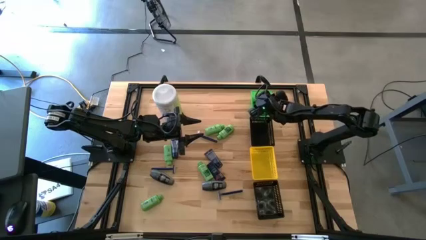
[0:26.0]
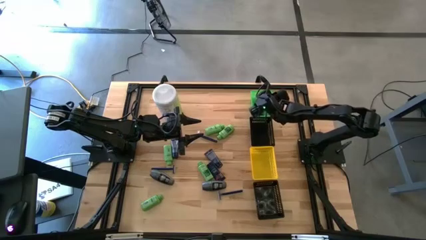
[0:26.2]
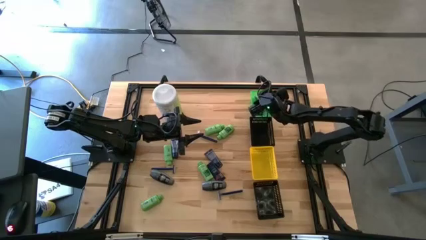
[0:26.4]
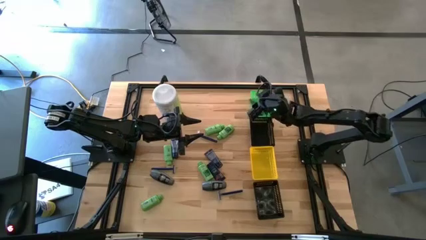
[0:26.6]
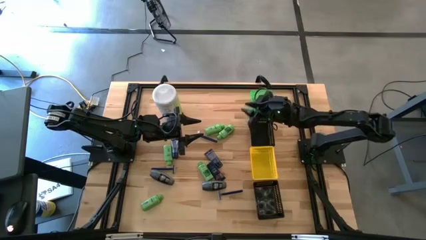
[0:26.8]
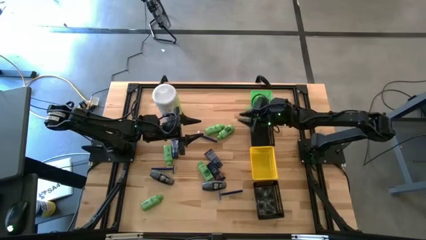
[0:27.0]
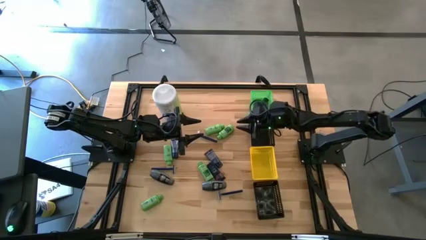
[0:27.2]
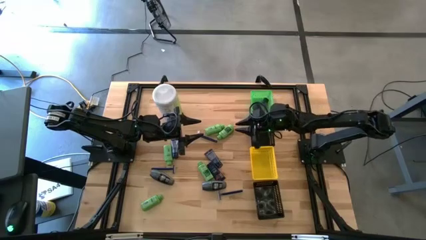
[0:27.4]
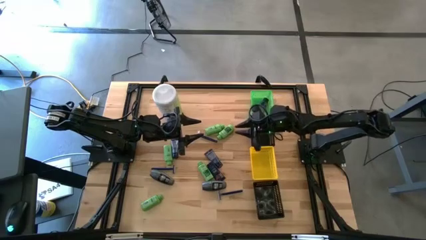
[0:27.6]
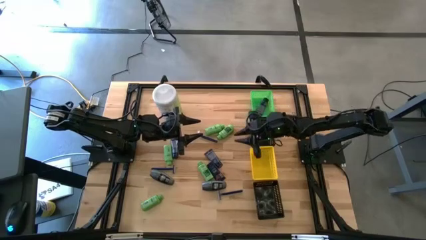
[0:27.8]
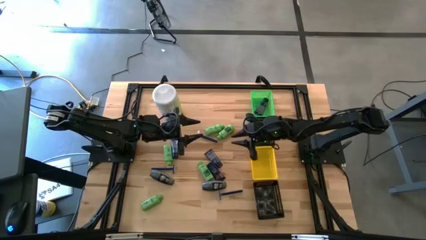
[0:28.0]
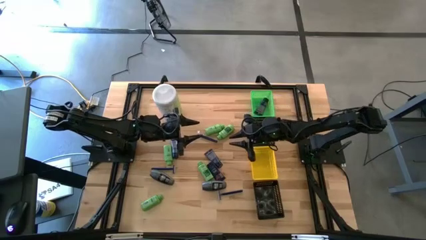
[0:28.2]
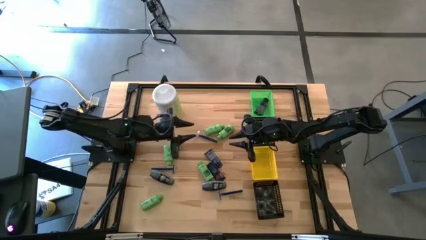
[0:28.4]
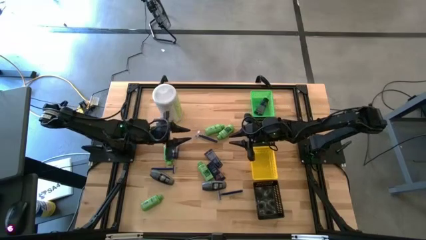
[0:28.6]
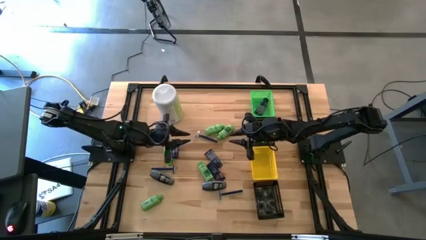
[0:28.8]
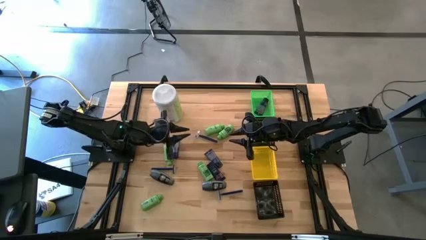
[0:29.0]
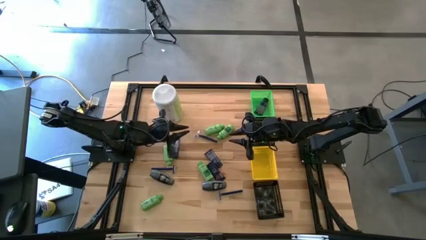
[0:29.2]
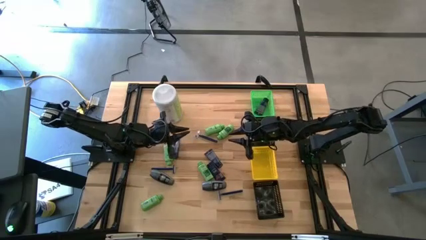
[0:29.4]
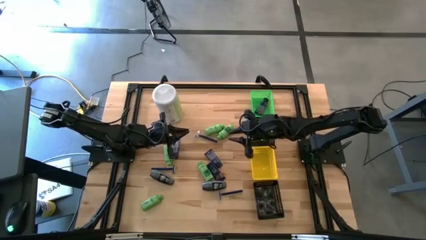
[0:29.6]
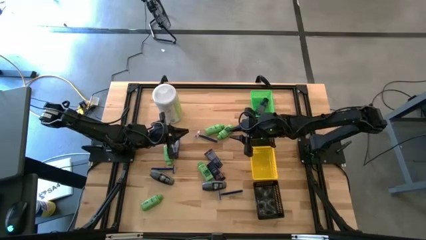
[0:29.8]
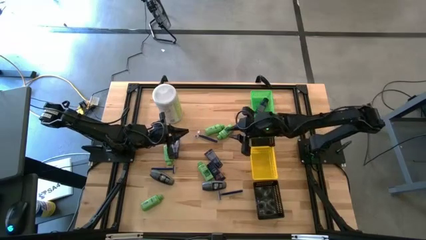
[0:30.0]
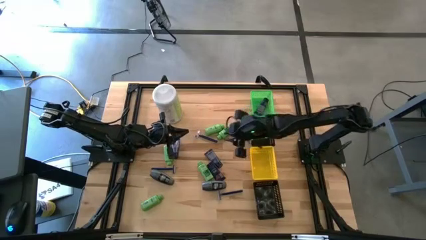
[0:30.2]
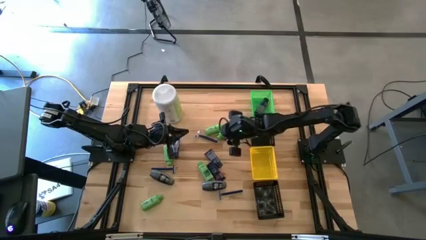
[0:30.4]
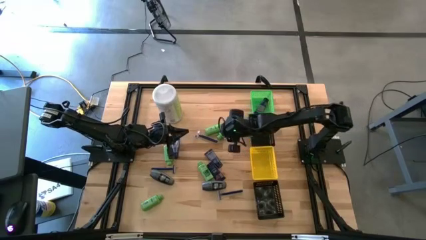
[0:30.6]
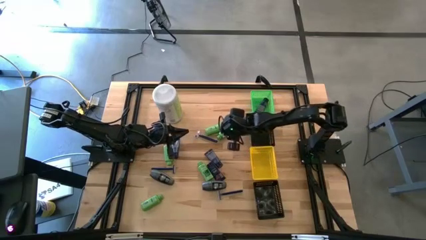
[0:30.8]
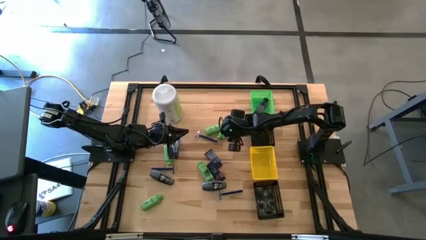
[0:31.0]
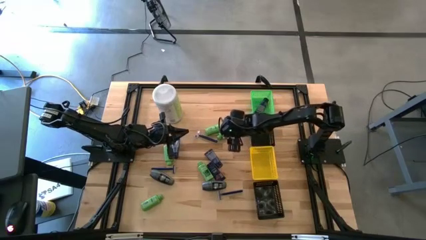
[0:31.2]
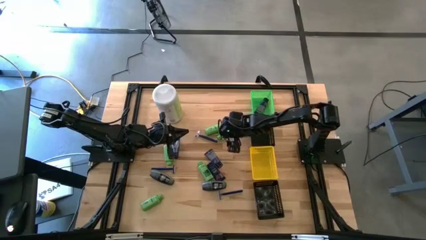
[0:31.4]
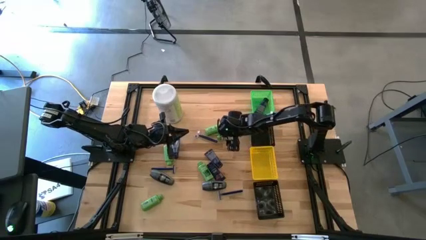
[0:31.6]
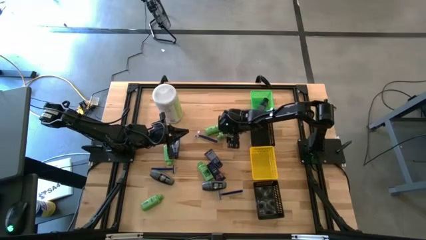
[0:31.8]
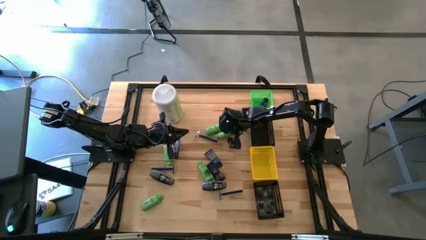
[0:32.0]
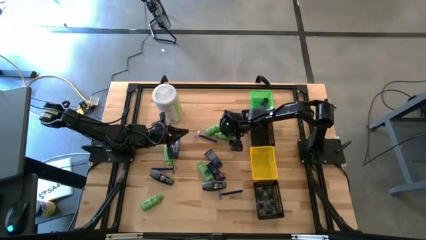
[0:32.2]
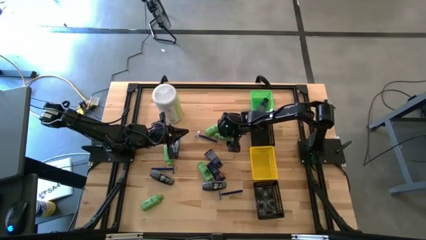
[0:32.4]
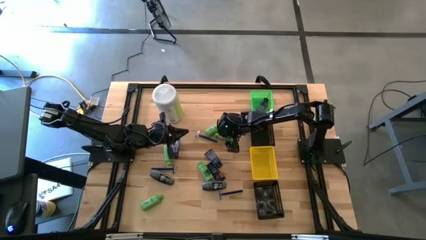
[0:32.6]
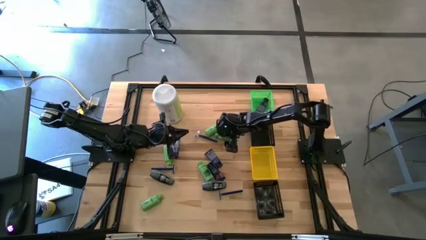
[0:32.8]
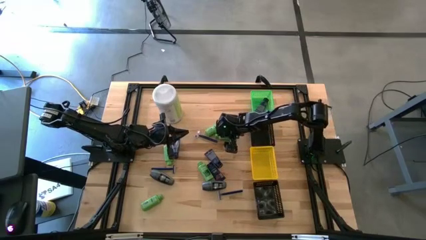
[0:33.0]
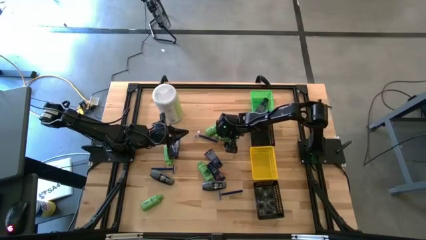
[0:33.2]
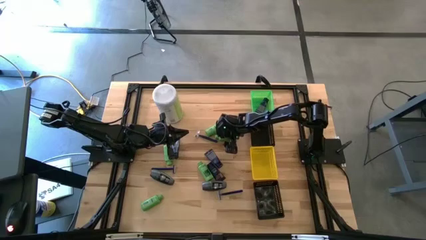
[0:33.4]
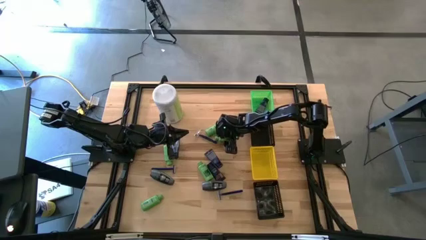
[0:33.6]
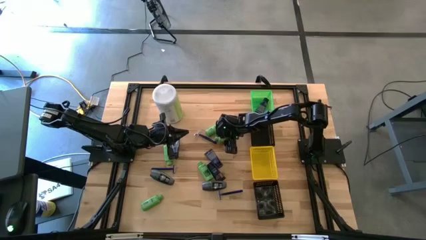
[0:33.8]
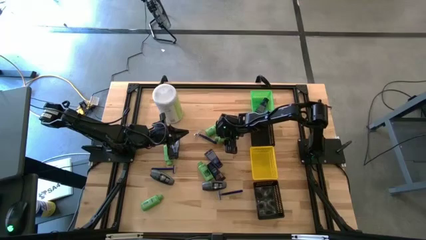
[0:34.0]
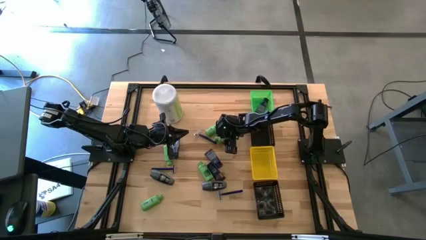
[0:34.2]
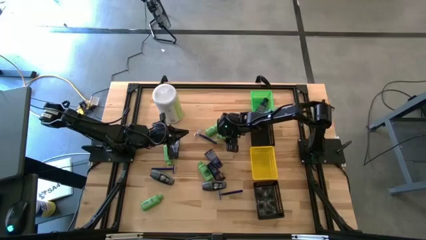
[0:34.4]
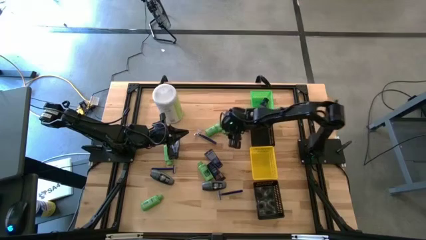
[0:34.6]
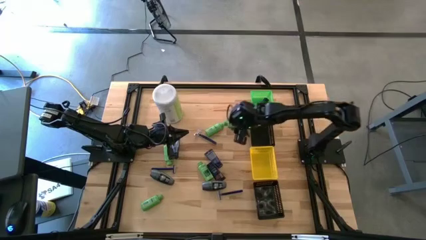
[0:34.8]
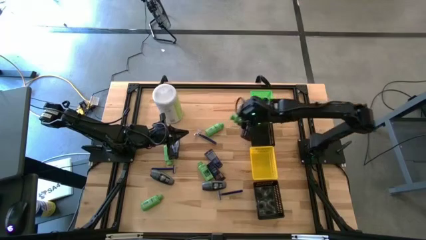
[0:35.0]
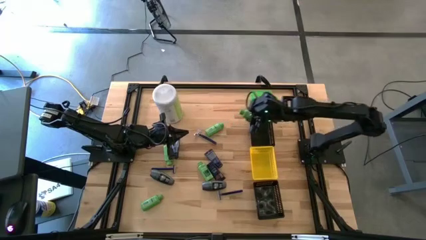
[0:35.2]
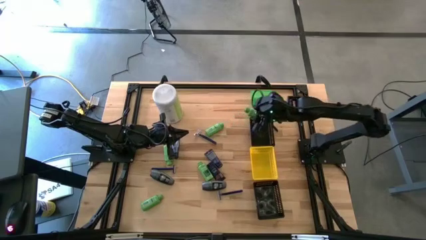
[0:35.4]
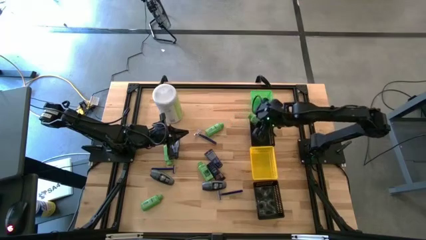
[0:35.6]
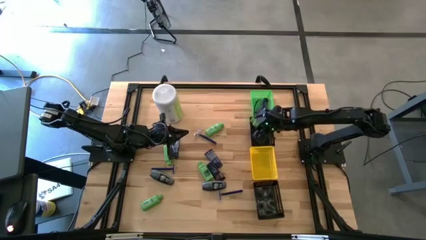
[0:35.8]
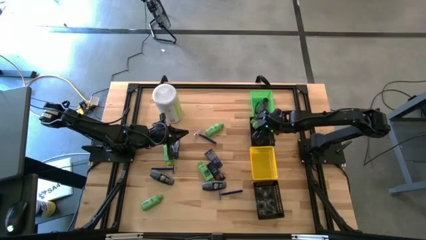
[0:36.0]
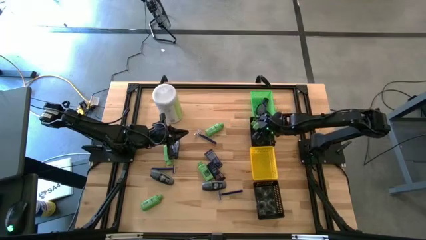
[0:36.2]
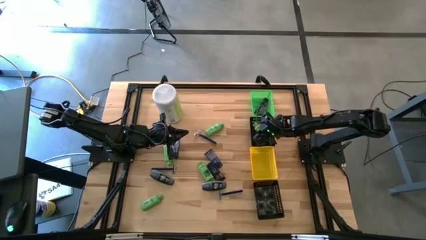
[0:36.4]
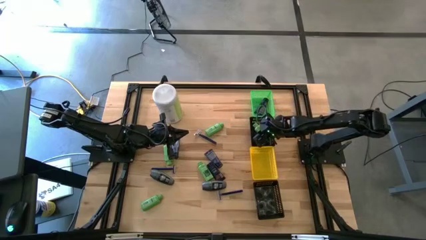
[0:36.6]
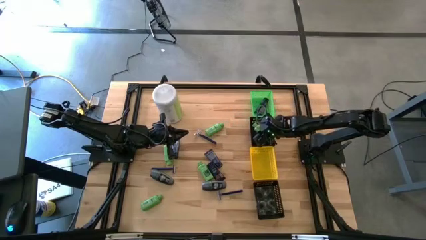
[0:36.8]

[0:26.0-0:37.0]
Task: Pick & Place Travel size toiletries
Put the green shampoo into the top black basket
